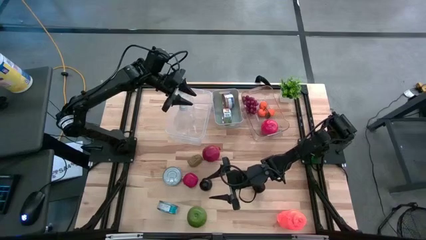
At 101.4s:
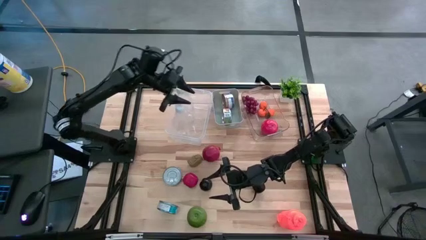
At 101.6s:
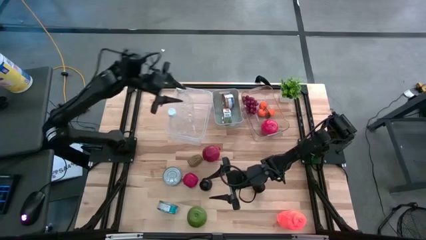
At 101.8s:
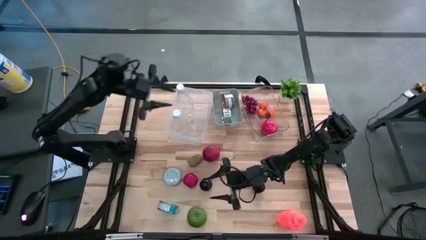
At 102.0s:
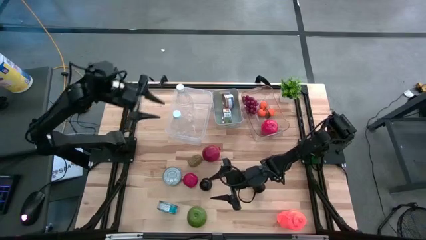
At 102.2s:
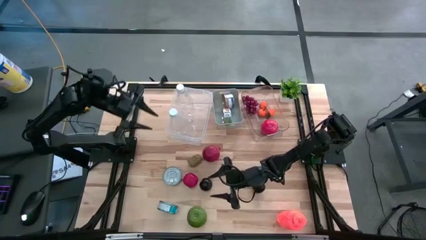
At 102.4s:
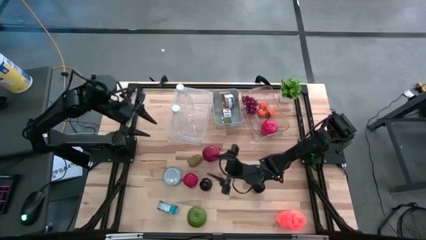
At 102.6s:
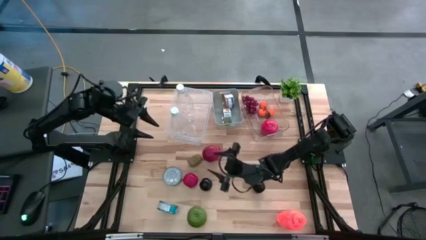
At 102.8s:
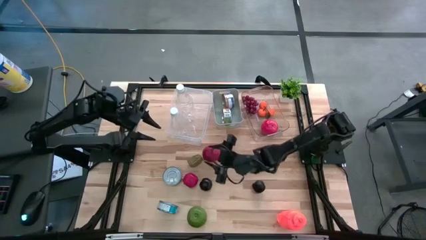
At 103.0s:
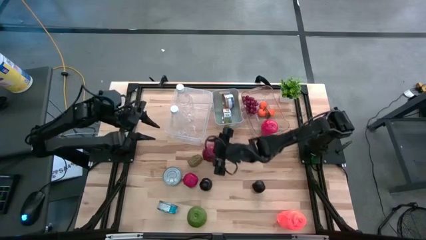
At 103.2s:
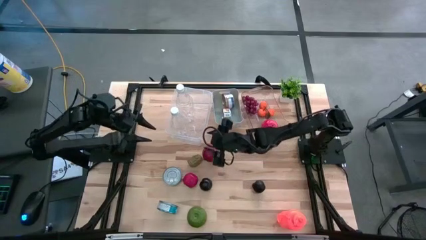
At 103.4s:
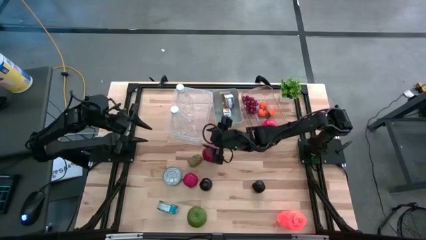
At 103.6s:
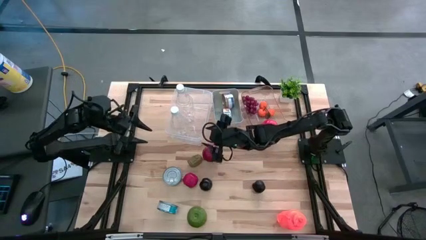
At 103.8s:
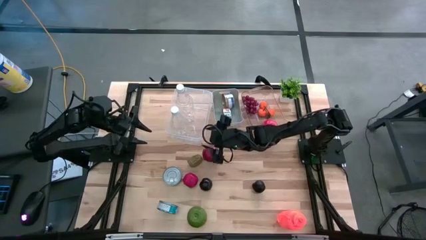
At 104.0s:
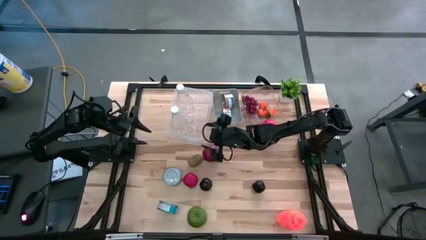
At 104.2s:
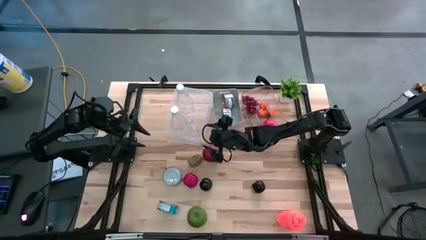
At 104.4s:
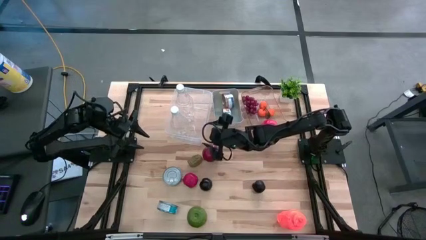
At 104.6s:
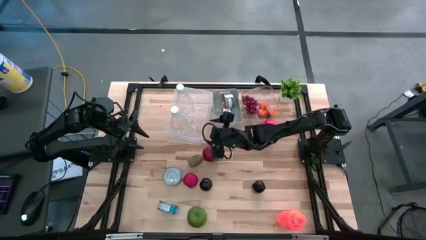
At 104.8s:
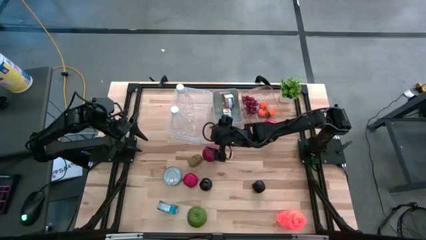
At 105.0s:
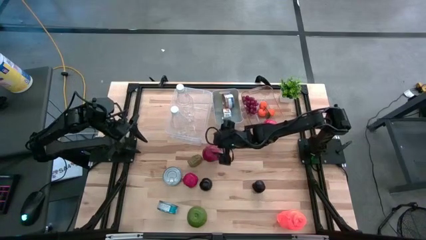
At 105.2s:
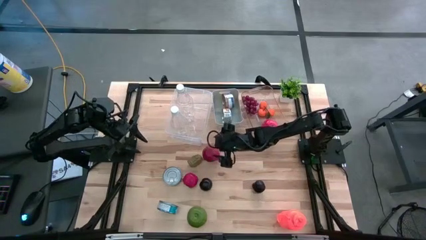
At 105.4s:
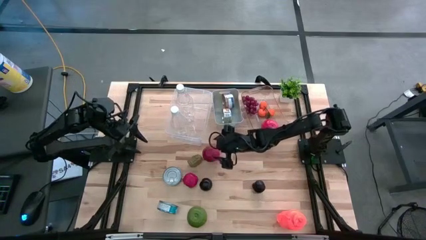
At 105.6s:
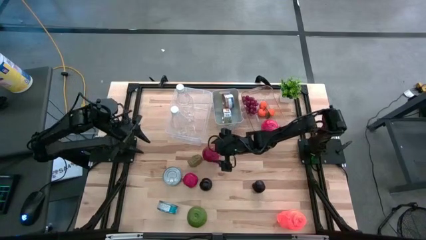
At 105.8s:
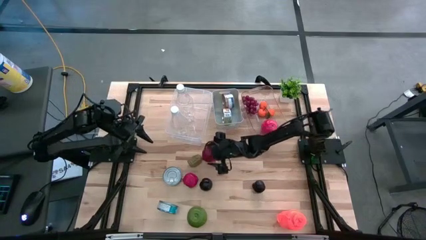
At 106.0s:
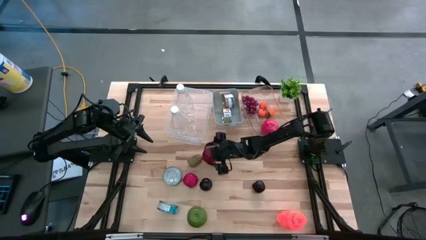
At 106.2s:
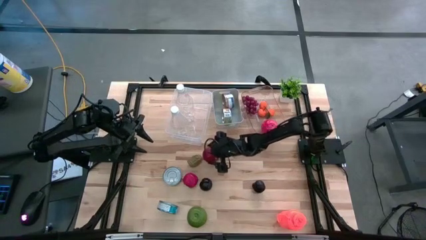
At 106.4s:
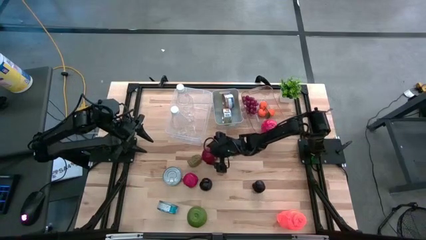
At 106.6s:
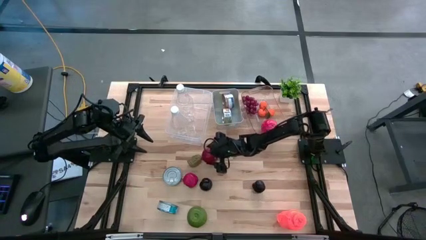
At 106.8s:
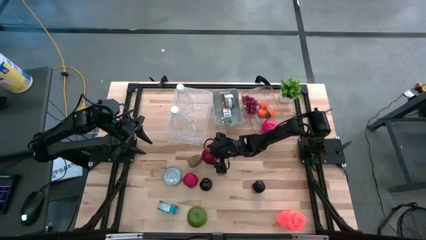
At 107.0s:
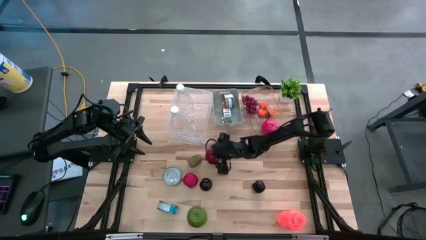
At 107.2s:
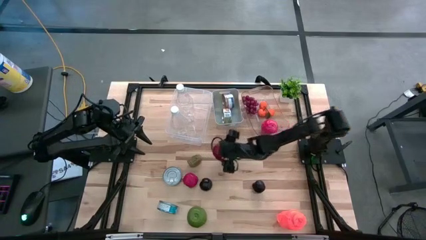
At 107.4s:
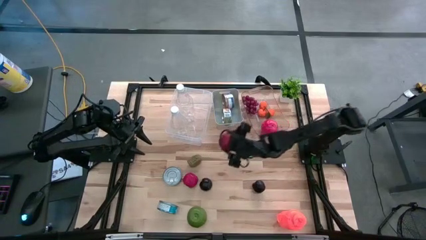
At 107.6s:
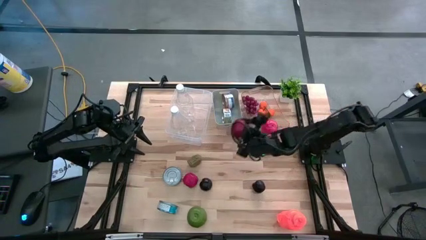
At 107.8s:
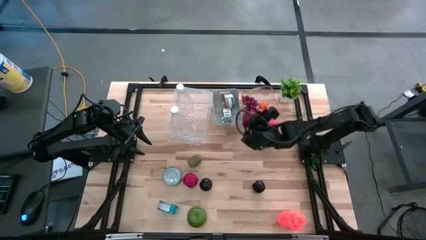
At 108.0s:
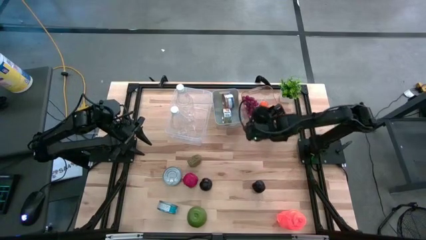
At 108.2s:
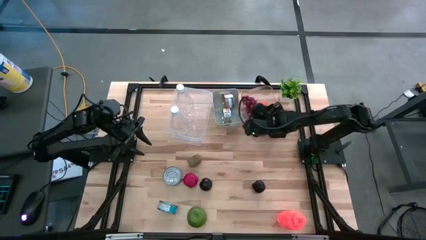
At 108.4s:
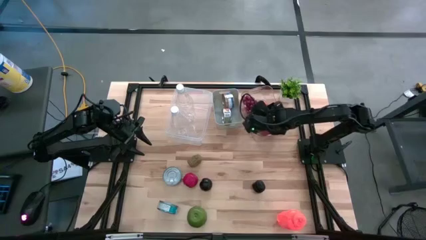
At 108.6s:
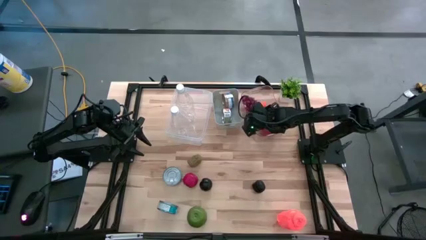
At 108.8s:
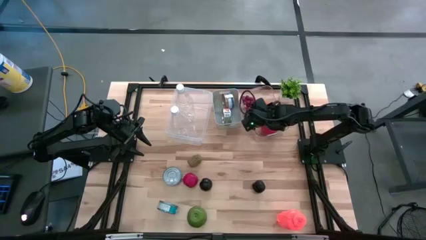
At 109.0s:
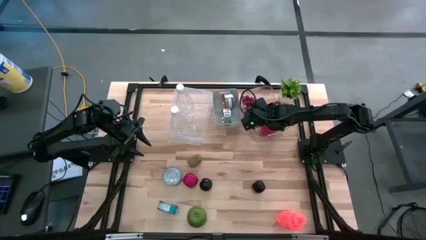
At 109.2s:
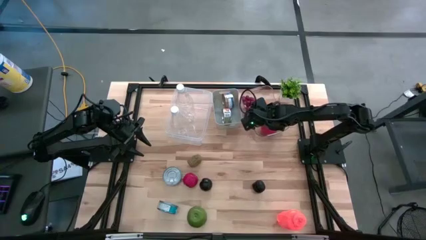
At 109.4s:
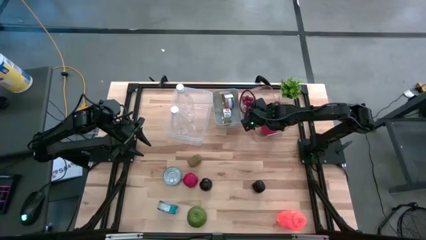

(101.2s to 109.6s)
Task: Pick & Place Food Item
Put the pomegranate into the right transparent bin

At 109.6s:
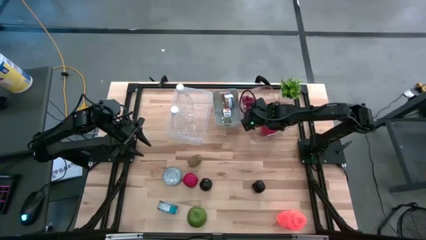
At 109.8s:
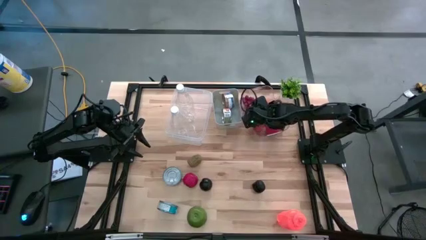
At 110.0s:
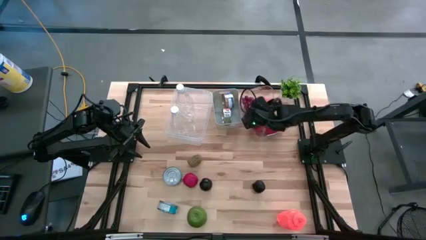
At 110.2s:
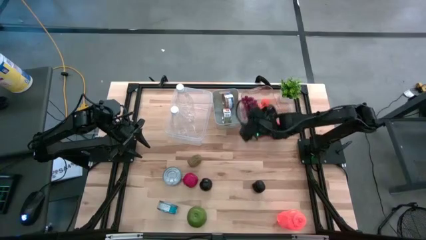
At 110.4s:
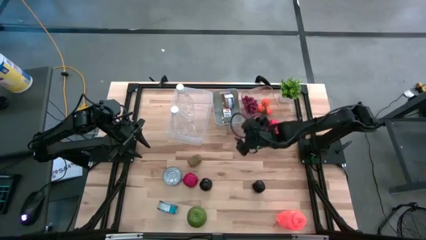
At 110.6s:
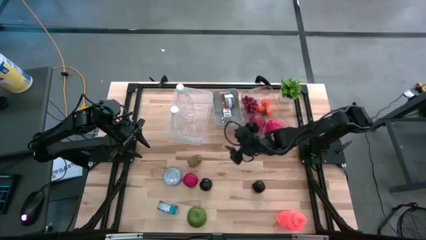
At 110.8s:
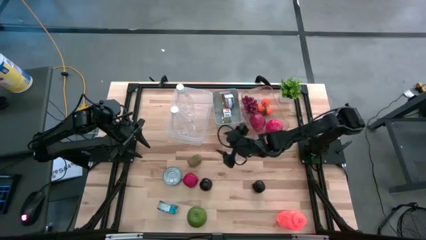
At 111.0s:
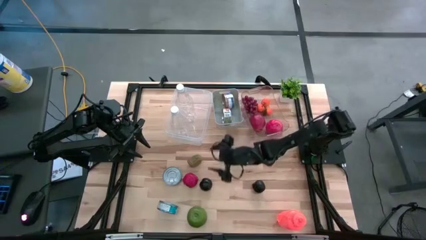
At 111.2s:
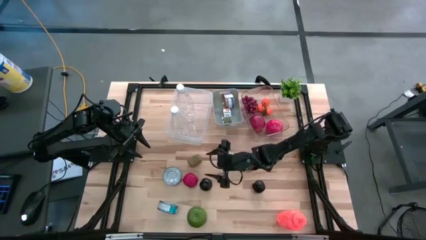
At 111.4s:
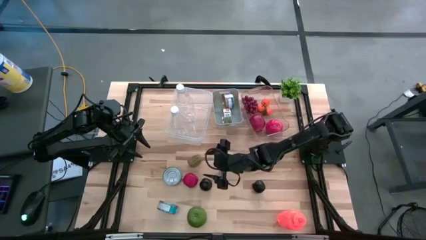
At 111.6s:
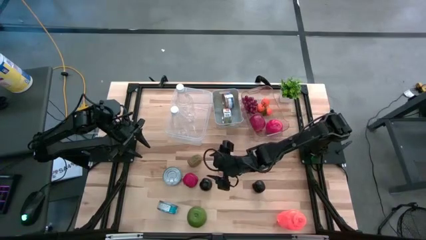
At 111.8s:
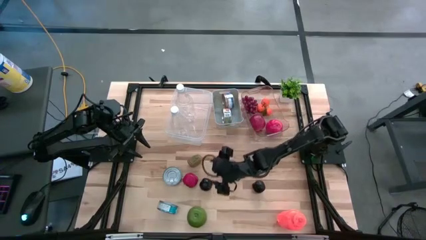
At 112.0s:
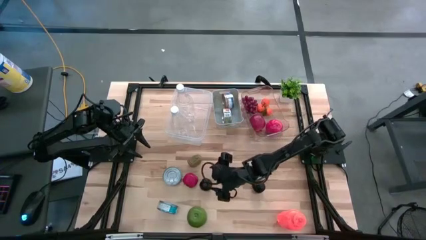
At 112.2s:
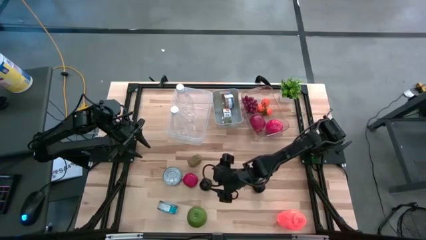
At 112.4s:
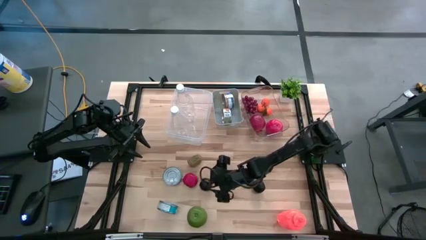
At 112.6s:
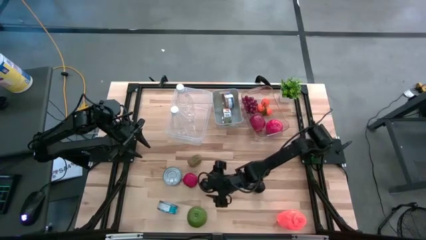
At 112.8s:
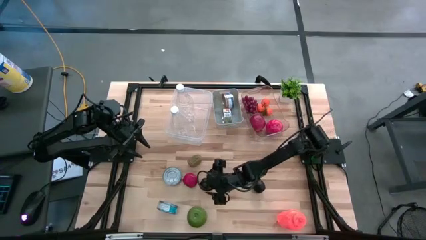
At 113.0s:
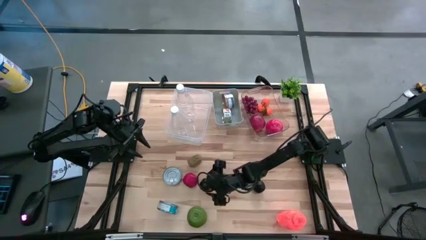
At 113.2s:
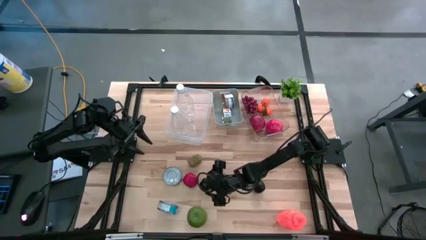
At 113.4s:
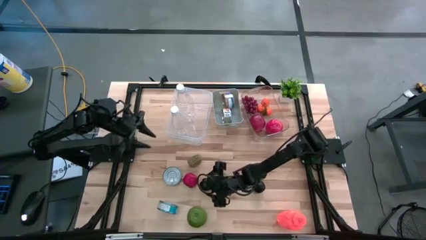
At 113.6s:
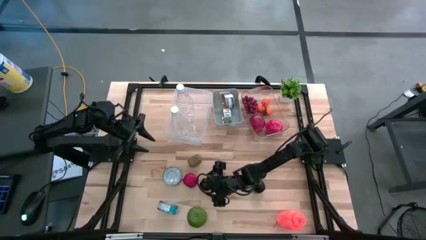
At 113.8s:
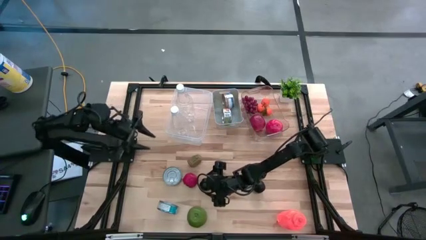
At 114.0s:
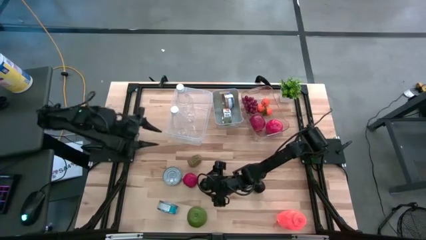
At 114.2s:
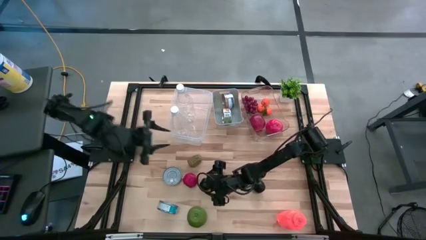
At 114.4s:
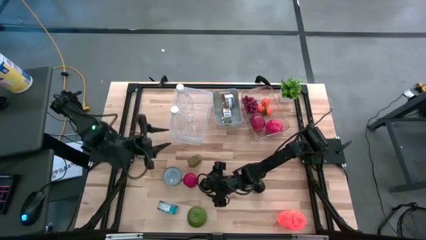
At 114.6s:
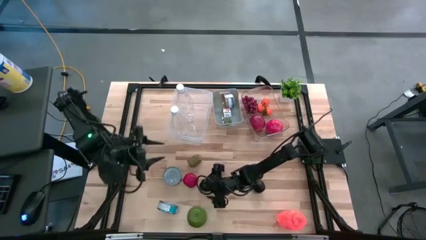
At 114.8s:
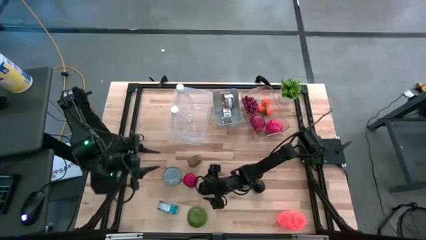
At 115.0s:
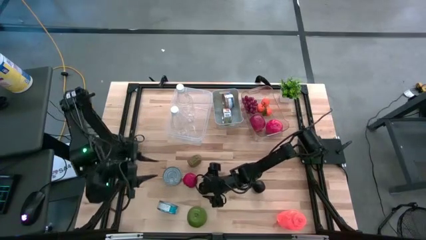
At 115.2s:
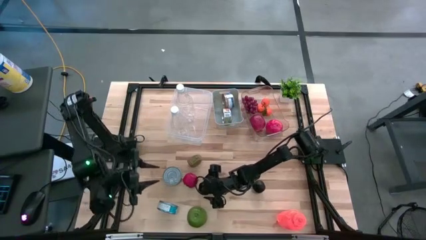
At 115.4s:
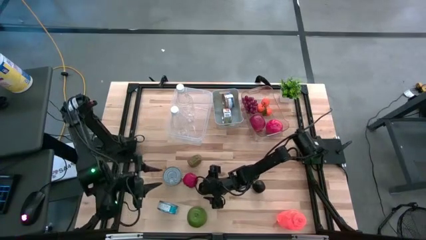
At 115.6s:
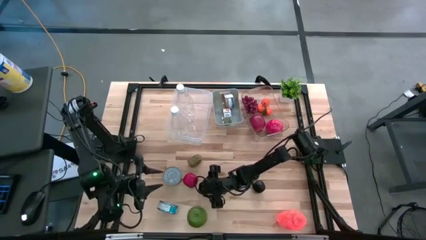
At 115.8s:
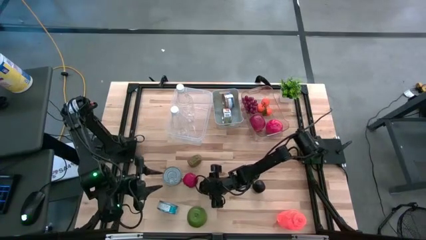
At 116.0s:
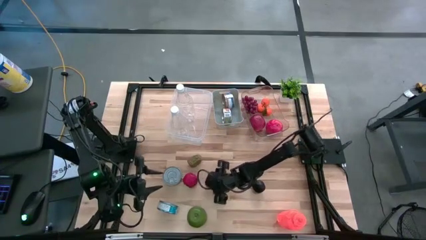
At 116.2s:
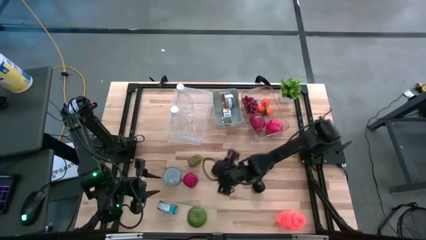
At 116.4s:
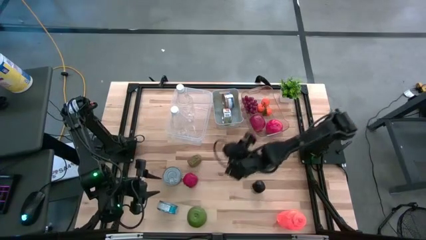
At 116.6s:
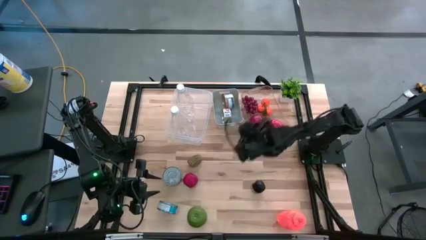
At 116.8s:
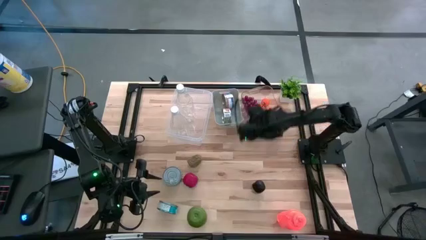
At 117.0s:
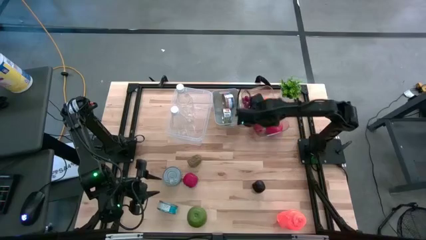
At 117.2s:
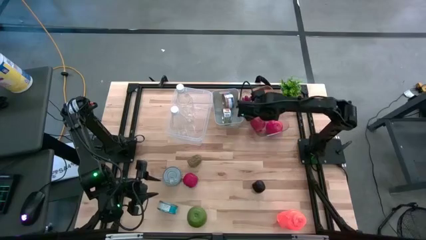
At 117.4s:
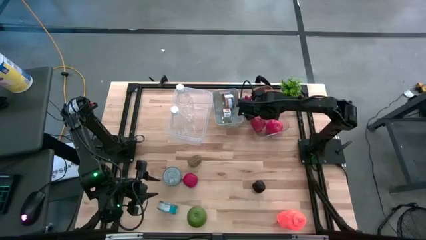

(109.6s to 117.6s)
Put the left plum into the right transparent bin
